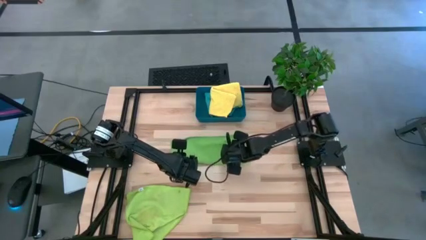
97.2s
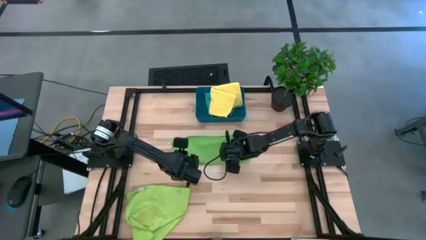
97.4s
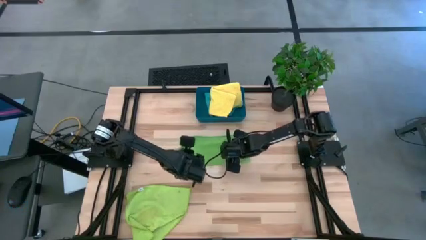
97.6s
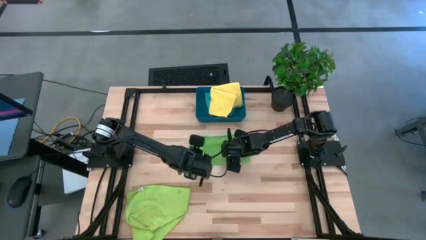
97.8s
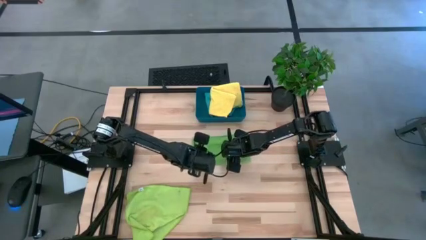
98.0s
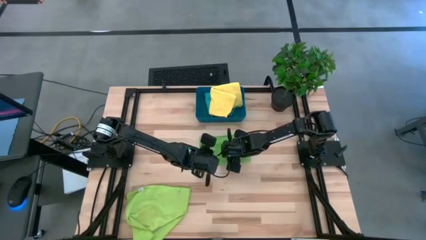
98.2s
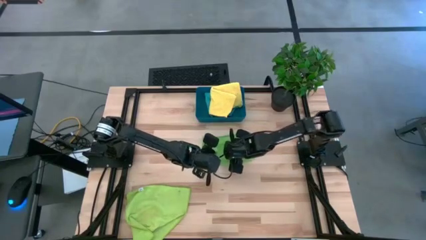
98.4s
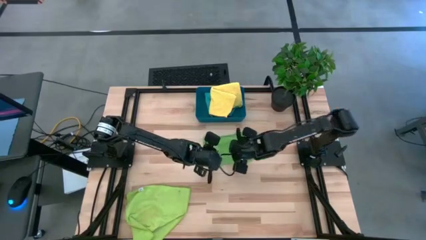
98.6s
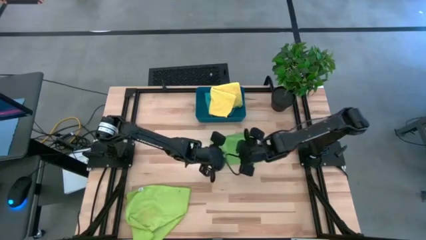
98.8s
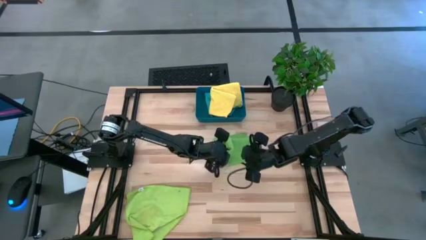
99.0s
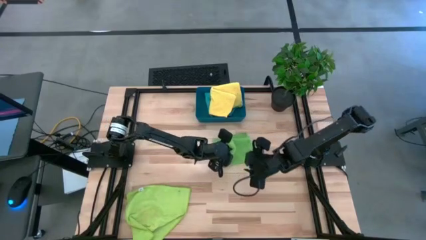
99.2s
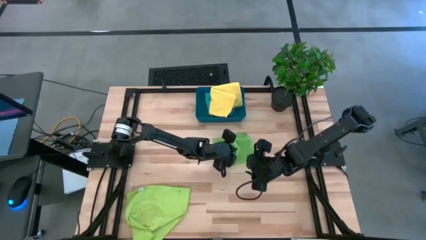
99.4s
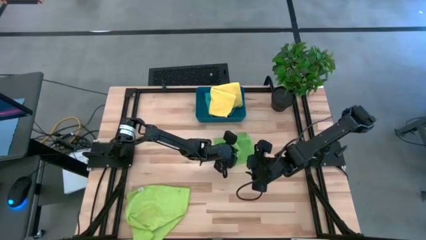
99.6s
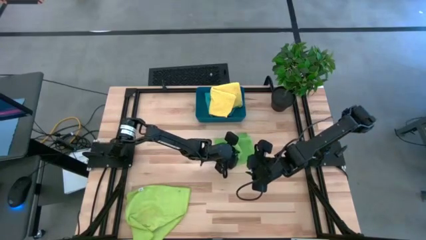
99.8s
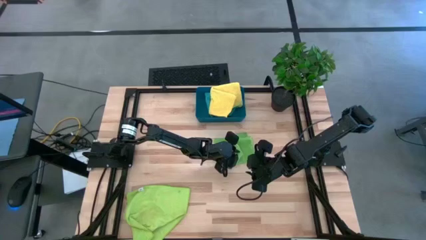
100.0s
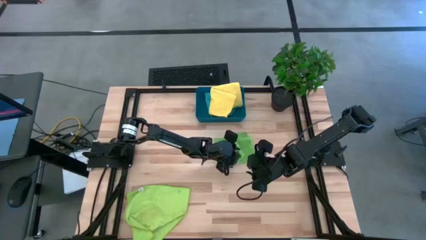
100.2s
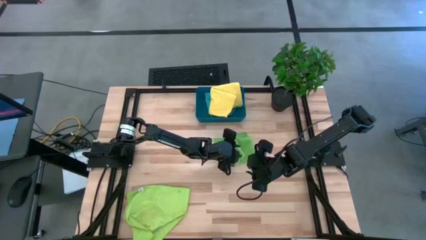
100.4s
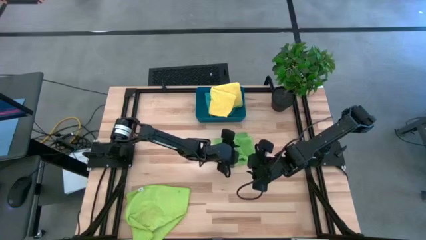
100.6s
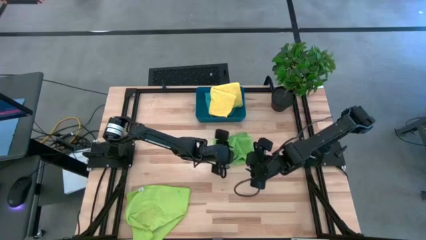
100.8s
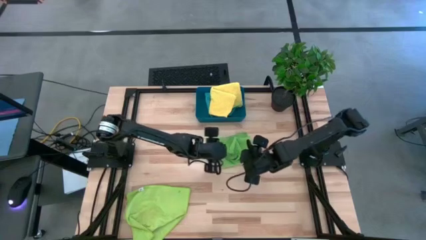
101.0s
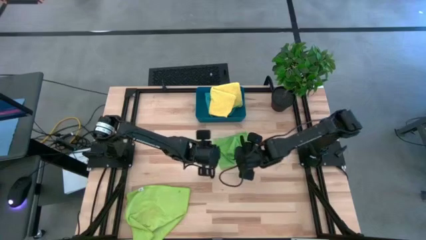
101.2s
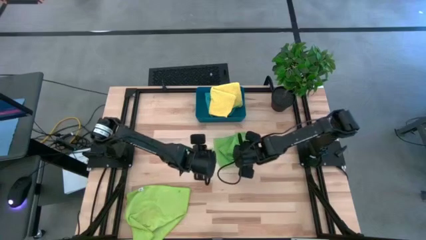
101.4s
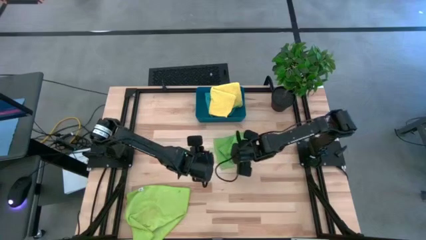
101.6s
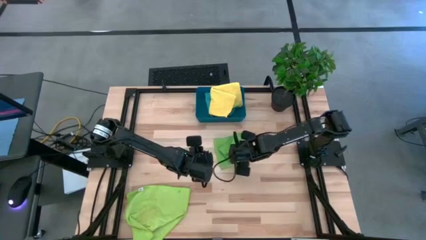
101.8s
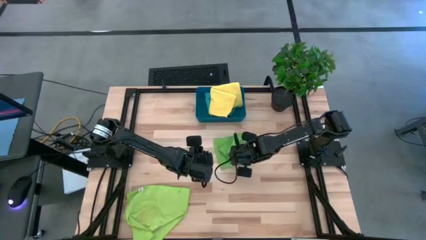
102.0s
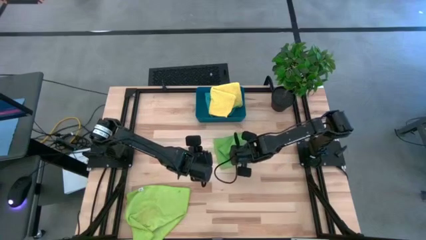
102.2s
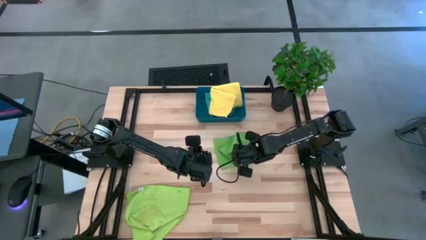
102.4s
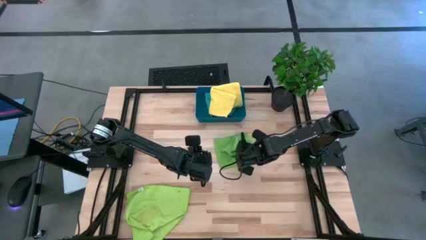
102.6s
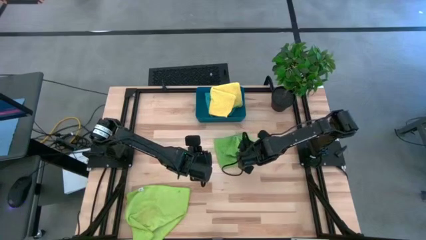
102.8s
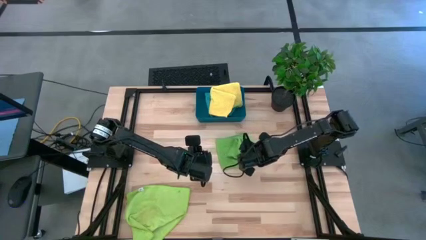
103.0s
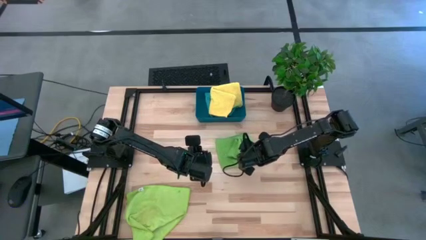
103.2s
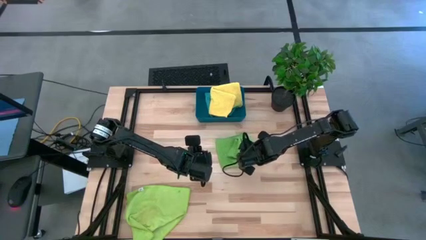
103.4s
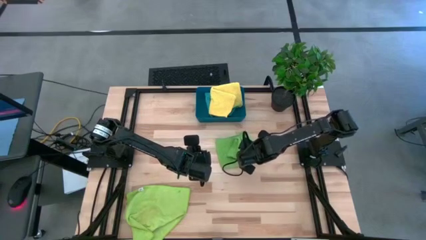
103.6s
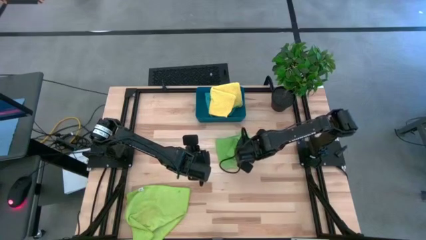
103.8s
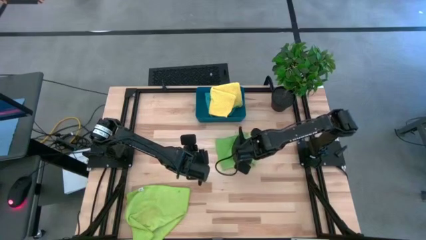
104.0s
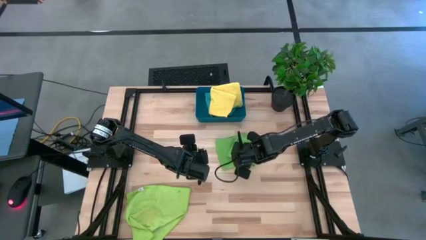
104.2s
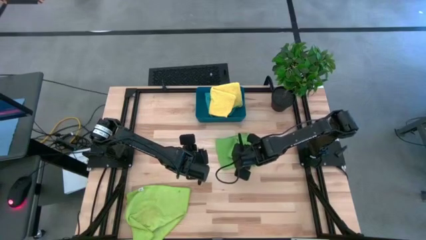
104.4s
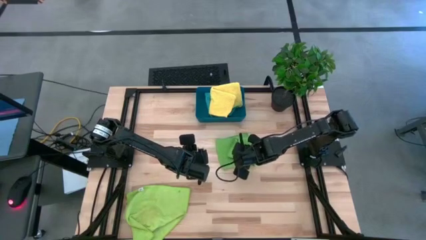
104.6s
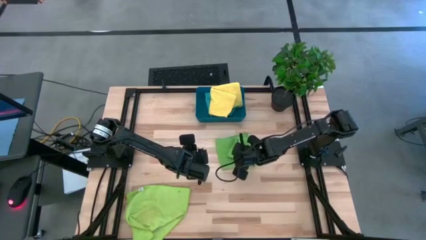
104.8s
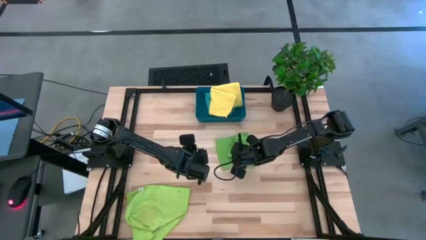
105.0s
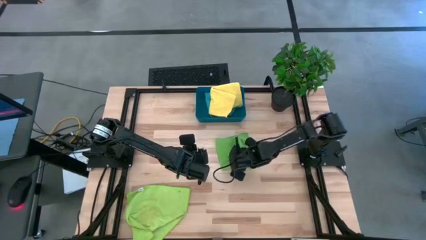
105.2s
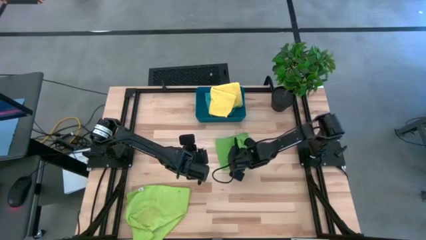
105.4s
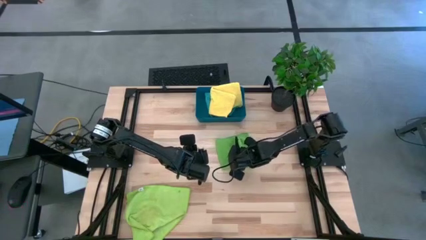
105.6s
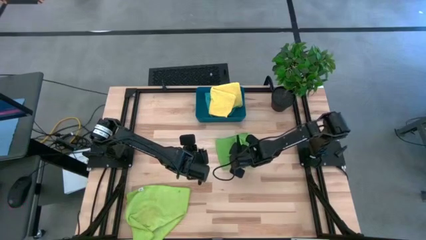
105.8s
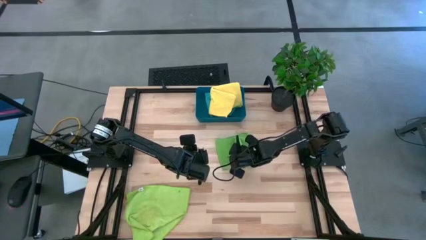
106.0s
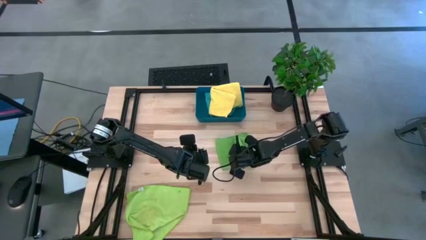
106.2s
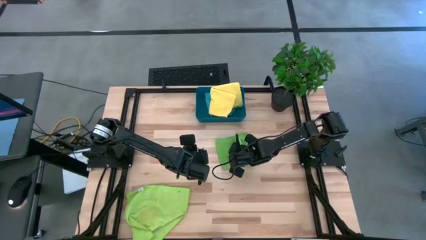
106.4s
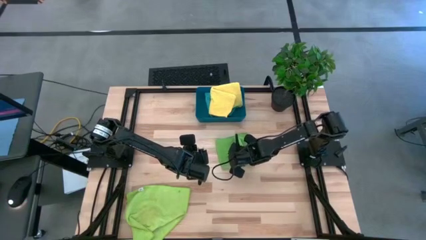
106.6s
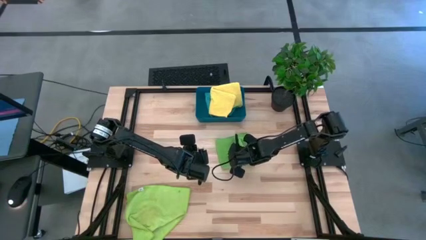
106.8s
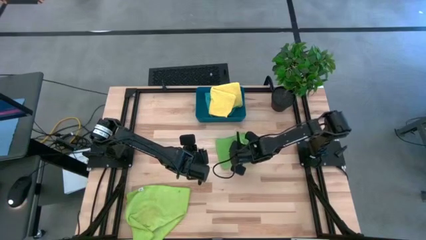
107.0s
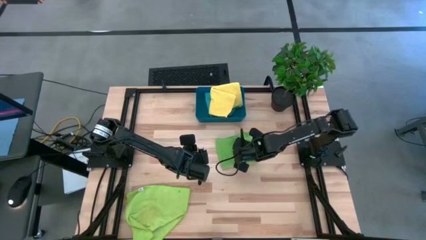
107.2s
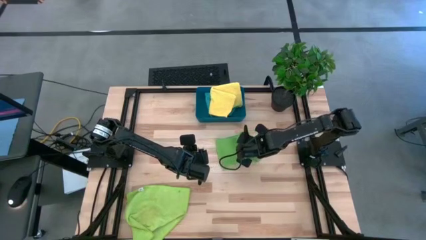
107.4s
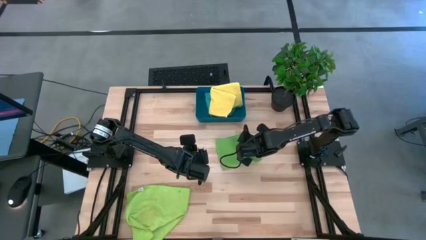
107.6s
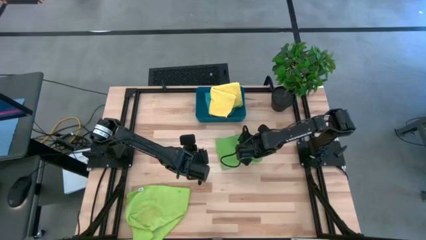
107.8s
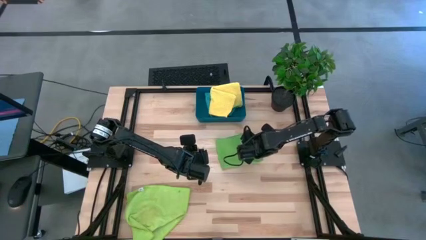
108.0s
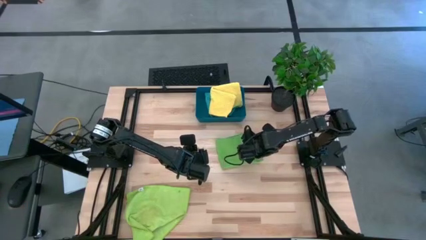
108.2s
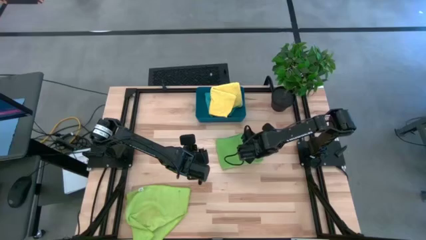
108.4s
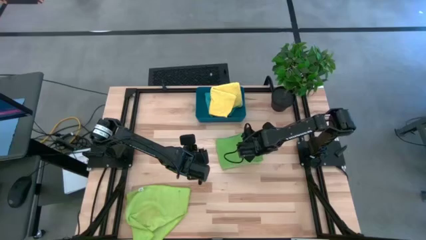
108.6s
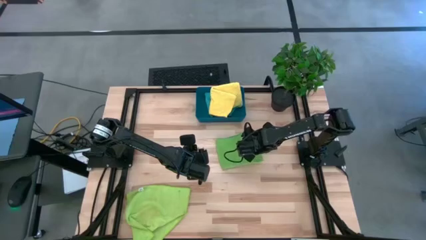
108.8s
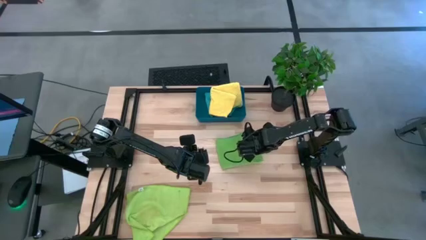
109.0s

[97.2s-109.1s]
Task: Fold microfiber towels
Fold the green microfiber cloth

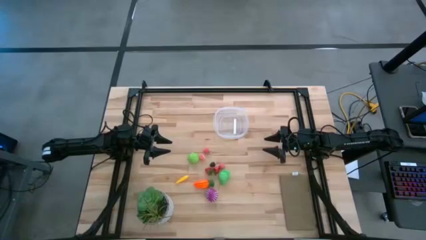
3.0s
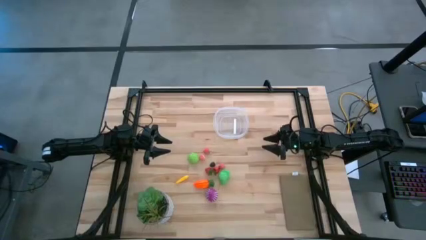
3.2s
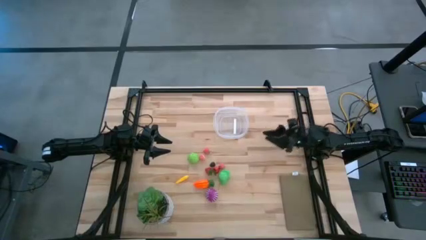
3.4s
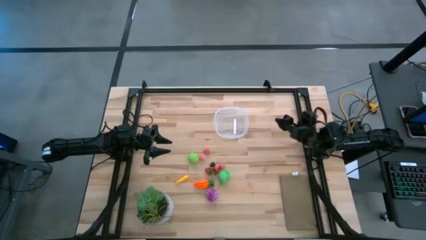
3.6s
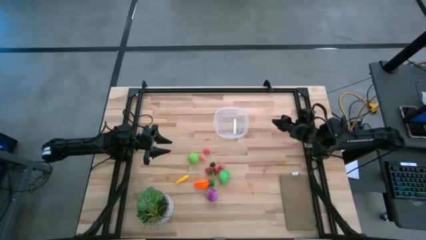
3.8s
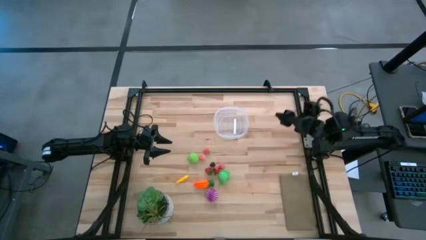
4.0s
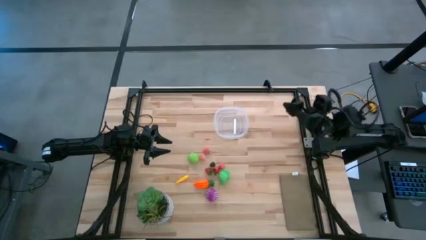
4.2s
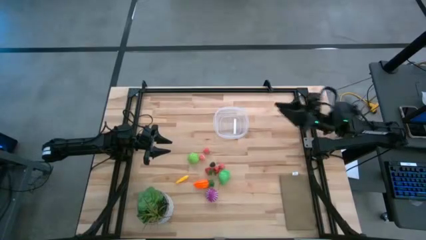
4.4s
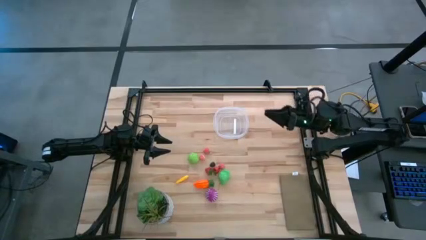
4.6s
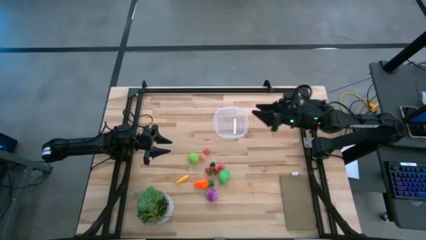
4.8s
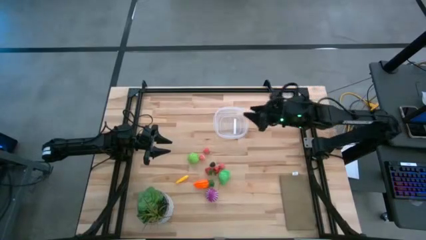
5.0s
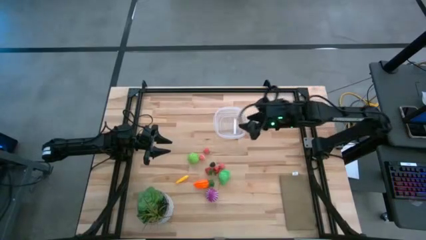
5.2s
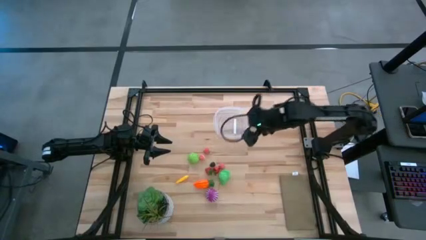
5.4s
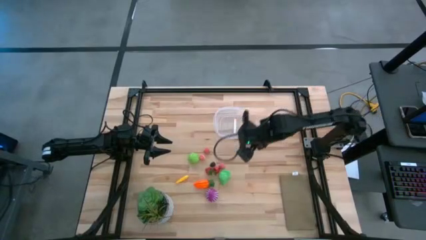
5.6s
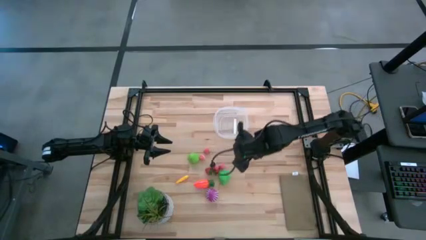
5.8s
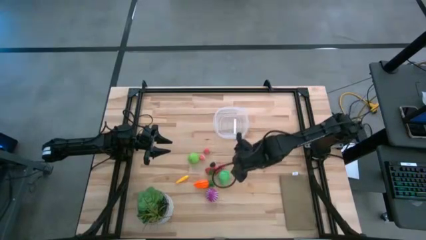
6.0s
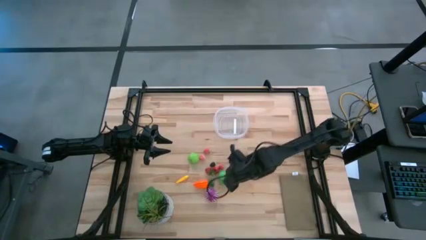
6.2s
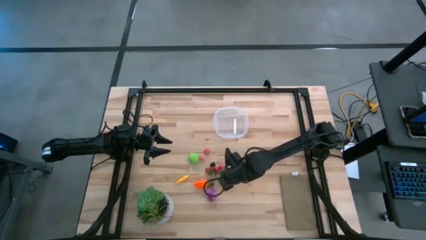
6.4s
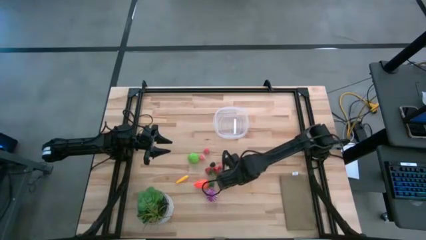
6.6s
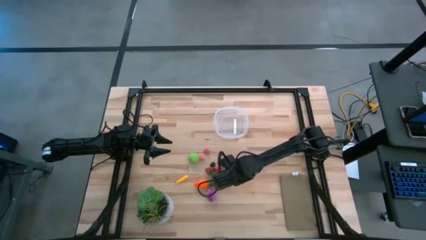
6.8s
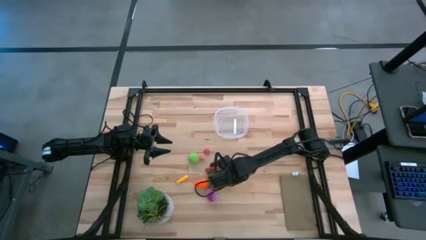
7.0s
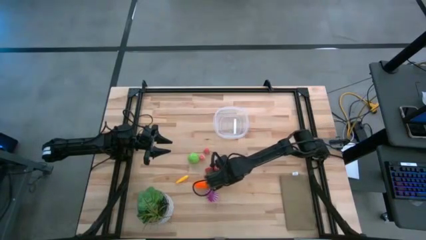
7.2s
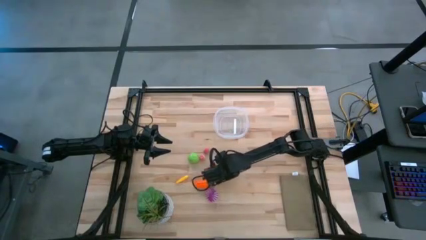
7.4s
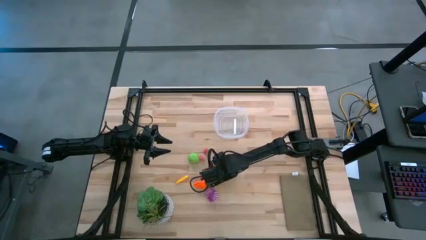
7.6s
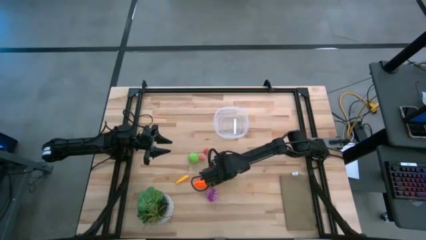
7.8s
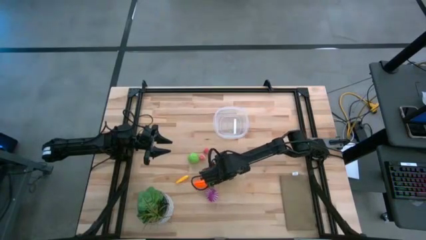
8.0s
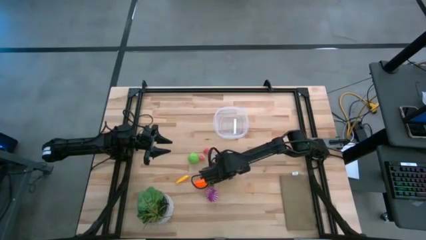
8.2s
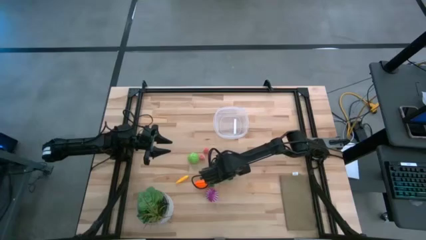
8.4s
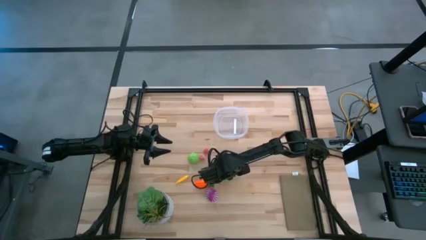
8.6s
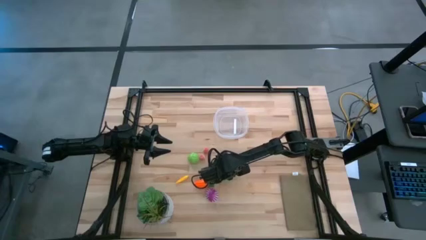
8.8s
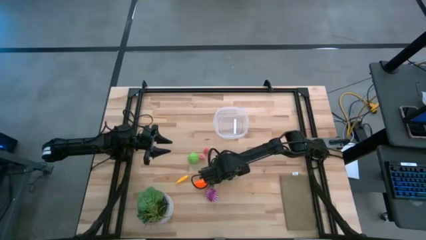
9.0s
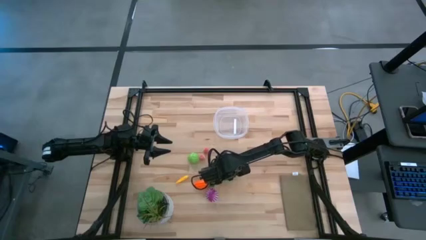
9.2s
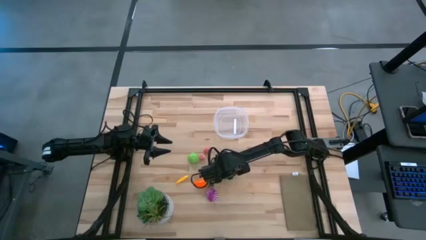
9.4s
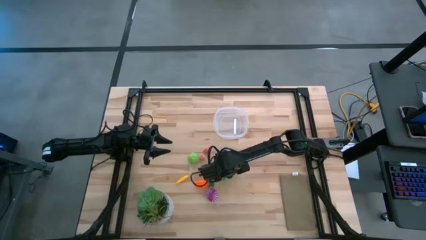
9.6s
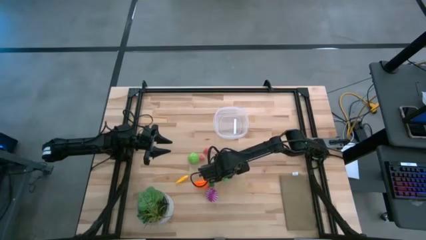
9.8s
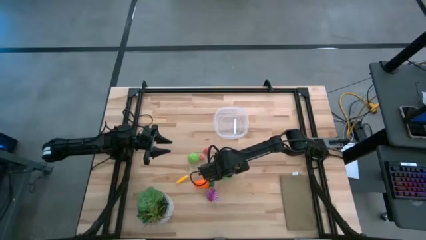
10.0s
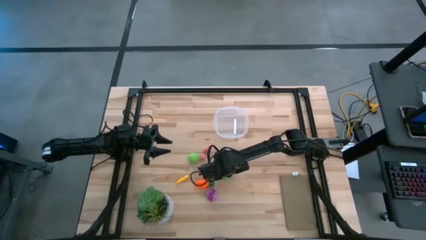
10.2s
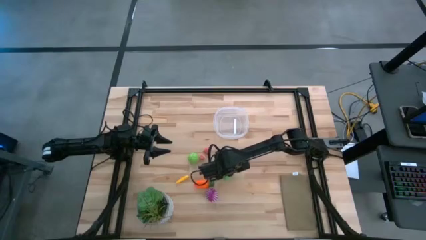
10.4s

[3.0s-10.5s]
Task: Pick and placing Produce into tupperware
Put the green pear into the transparent bin
